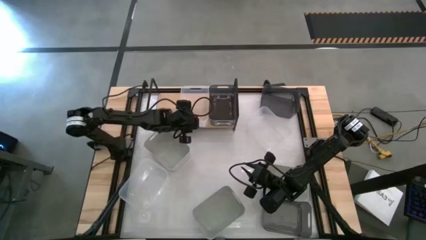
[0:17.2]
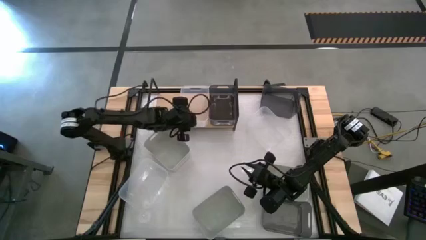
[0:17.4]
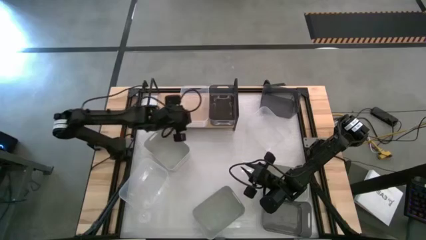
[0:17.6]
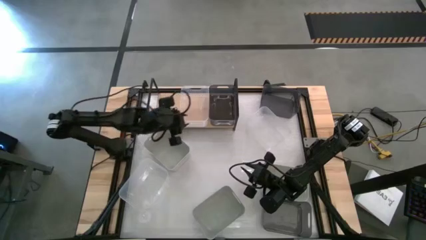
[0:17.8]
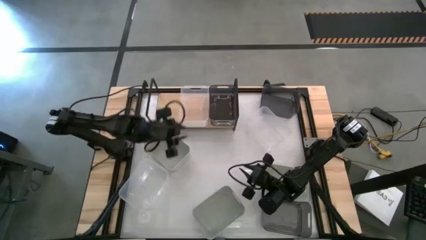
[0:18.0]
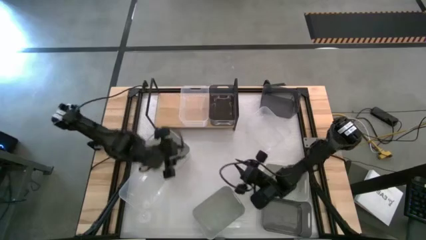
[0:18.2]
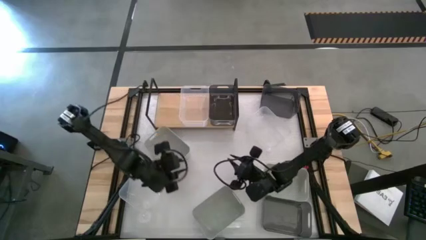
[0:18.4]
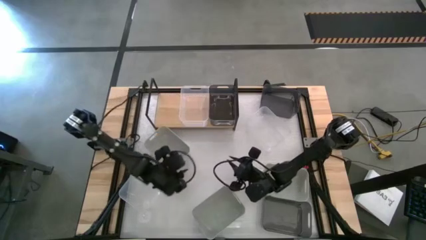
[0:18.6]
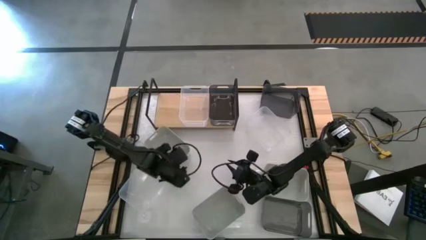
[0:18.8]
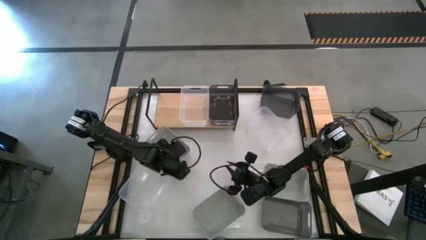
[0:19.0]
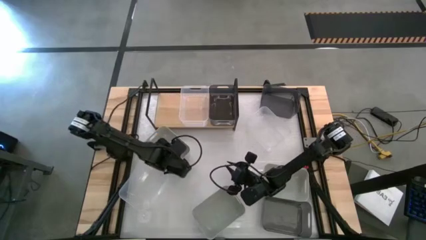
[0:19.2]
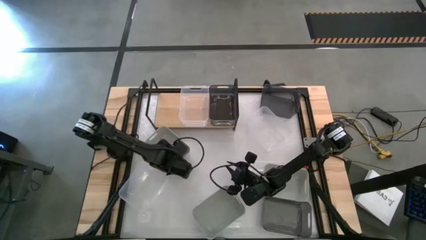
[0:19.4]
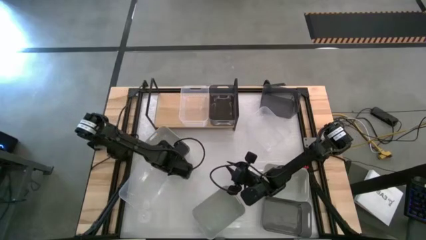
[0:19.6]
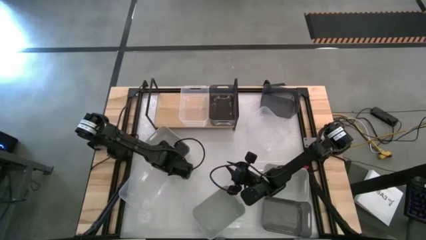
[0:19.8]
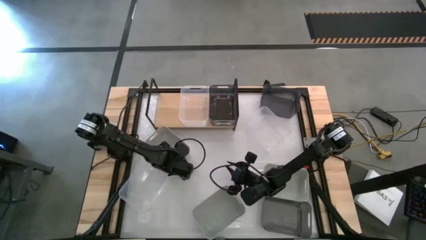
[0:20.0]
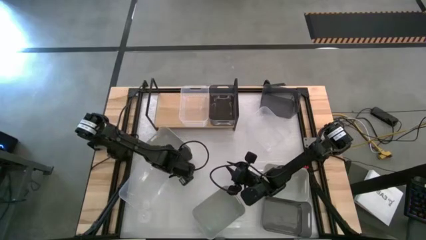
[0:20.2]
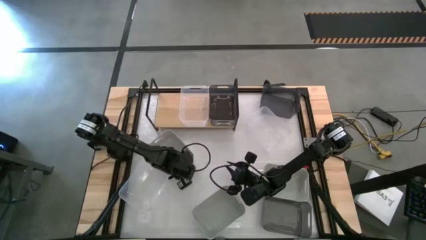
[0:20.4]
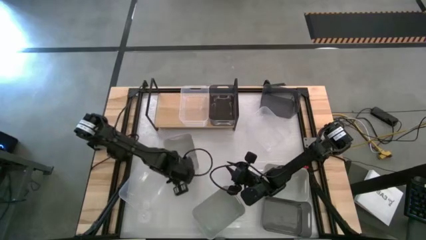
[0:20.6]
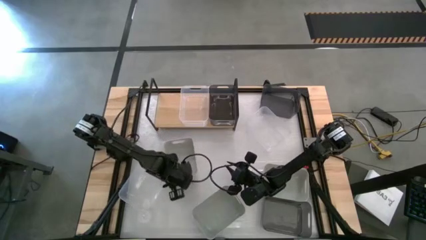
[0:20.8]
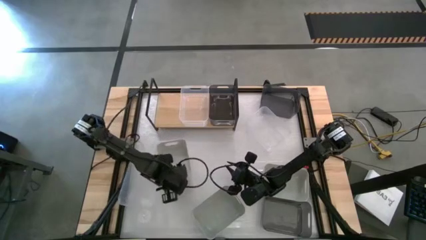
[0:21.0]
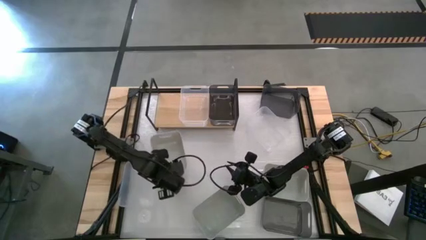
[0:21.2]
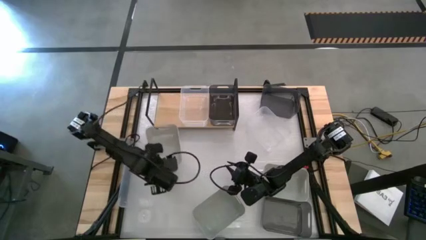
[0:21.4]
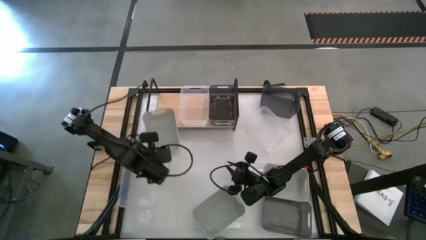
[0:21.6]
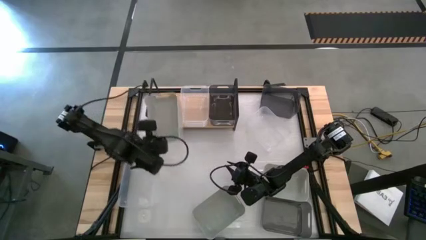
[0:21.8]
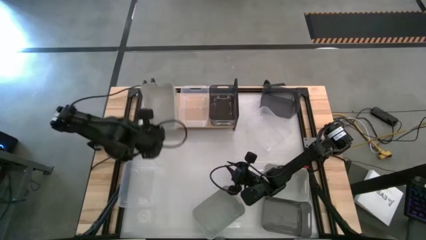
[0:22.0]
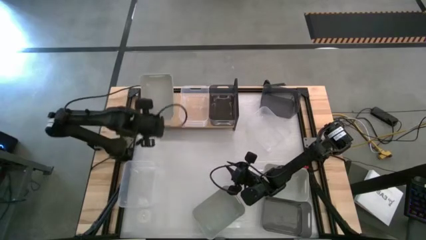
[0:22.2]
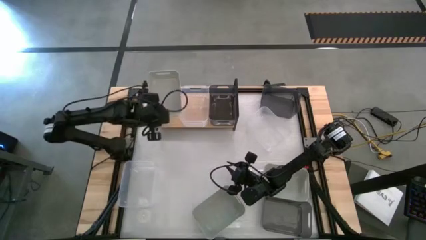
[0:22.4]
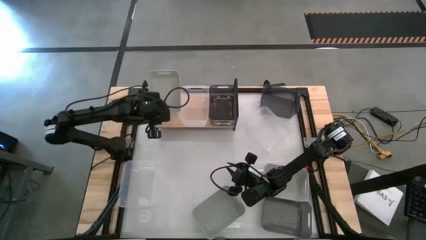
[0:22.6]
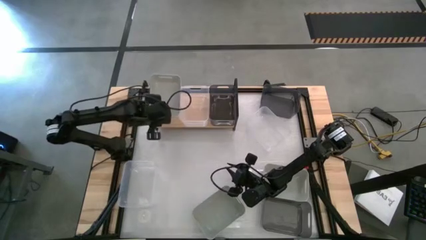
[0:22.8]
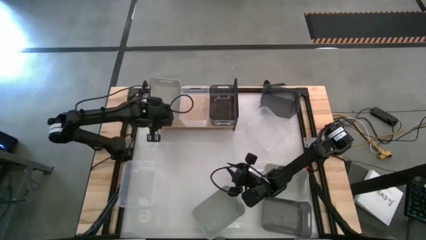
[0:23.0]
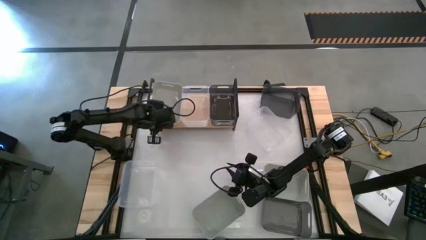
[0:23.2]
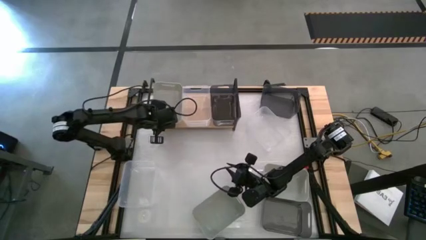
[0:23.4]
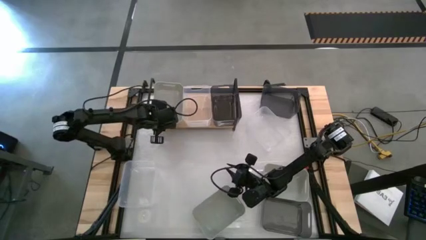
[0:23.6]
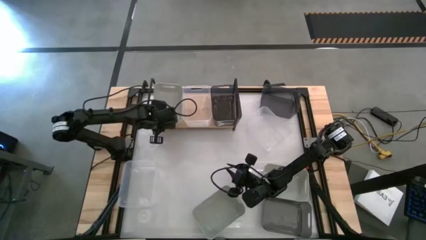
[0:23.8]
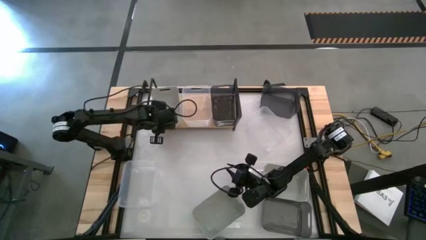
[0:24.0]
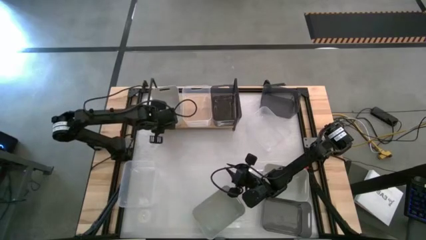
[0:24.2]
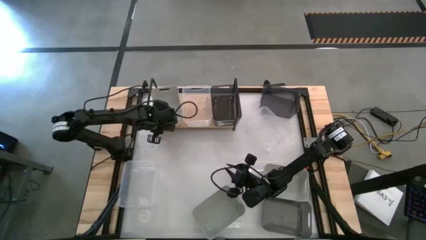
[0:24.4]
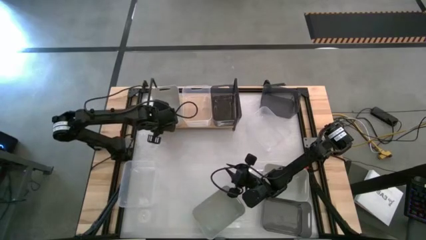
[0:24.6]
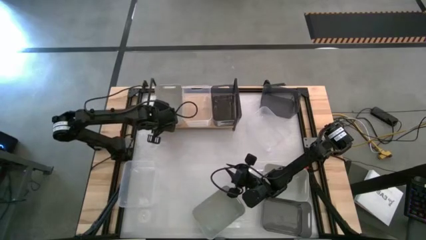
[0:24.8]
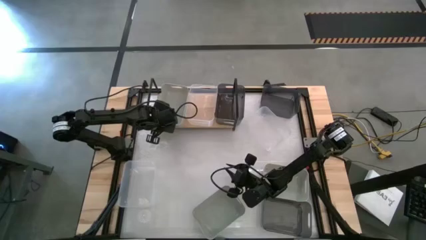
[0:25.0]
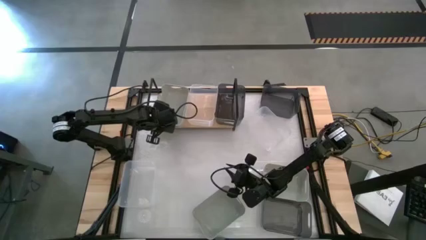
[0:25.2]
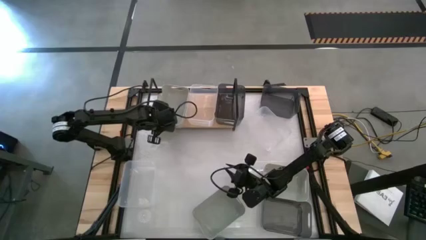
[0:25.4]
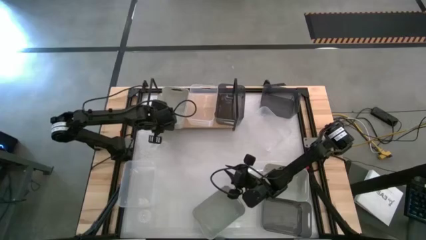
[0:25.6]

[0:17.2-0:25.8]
Task: Stack baskets on shelf by color
Put the left gray bin on the shelf

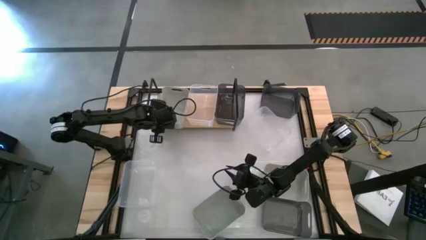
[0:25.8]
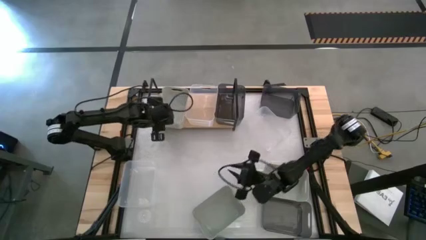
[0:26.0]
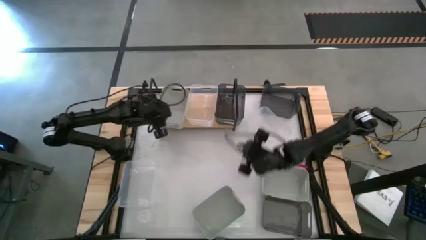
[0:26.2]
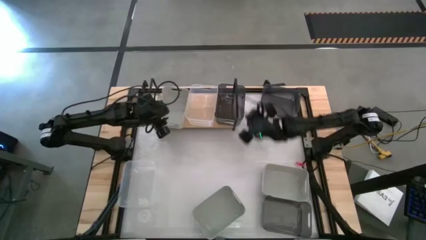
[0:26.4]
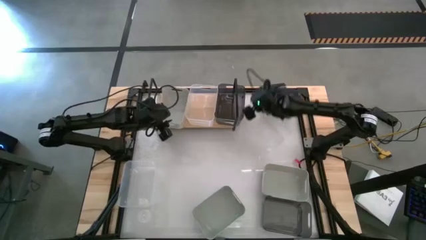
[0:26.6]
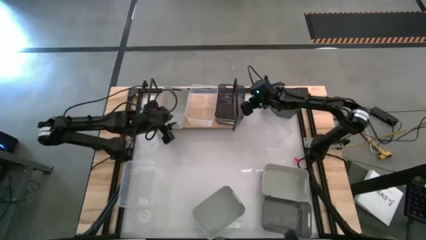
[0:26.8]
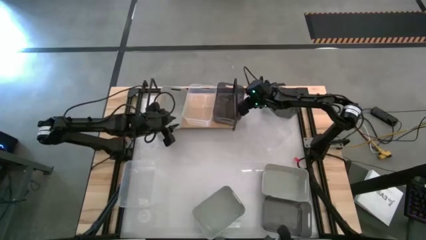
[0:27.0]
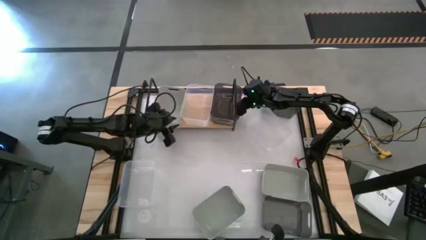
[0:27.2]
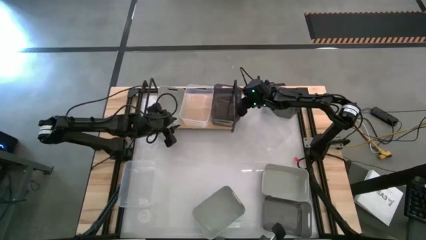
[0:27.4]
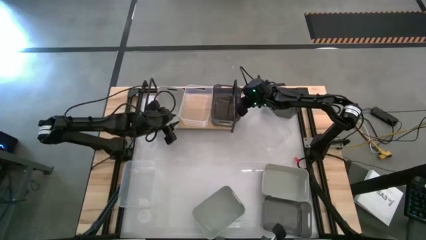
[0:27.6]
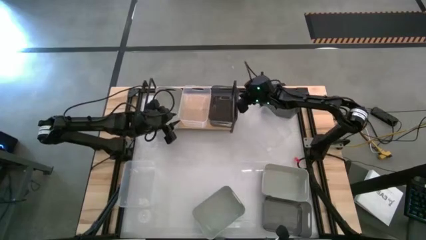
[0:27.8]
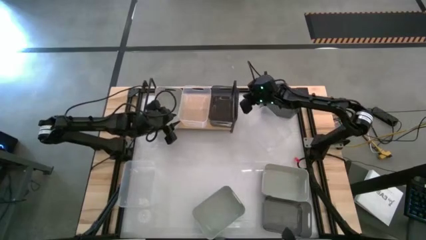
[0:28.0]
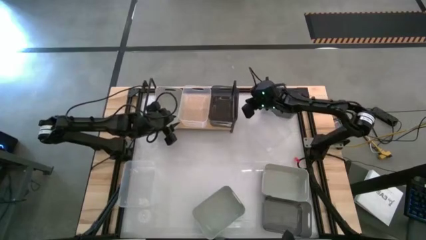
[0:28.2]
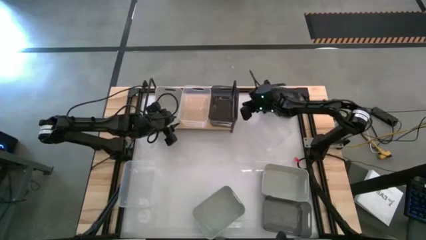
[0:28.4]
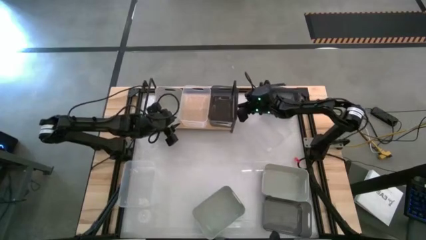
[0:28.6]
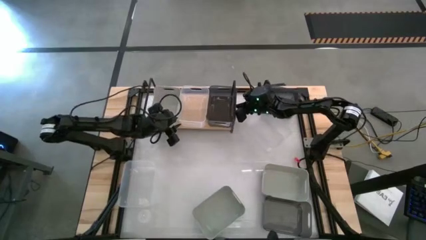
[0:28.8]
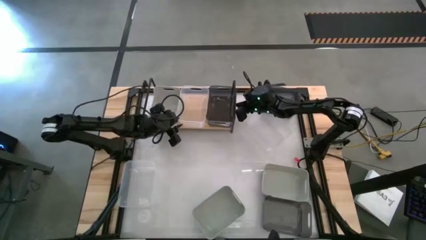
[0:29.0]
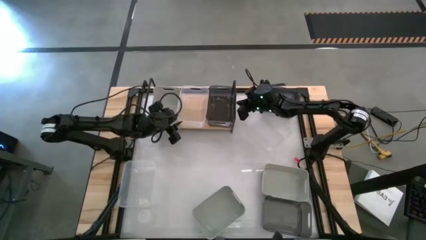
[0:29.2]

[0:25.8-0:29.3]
Adjust the bins on the shelf

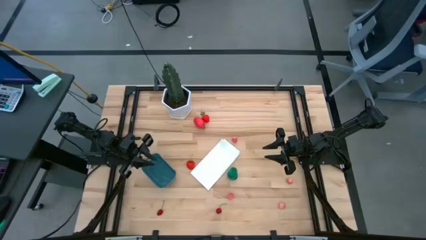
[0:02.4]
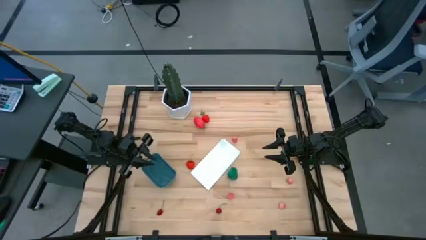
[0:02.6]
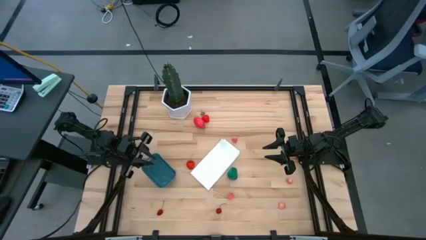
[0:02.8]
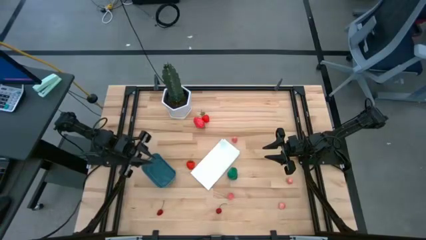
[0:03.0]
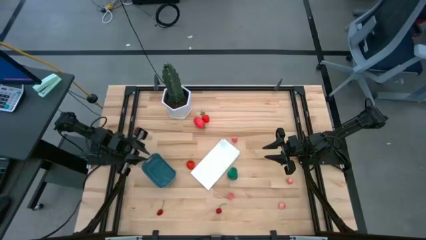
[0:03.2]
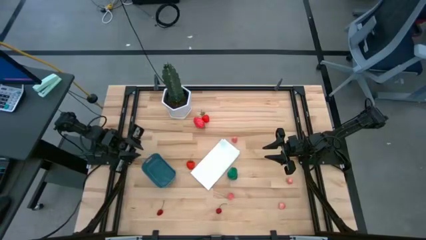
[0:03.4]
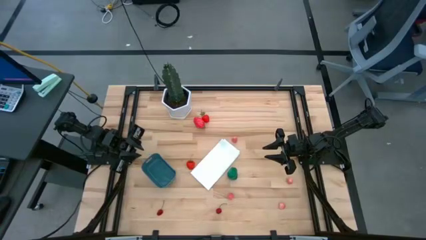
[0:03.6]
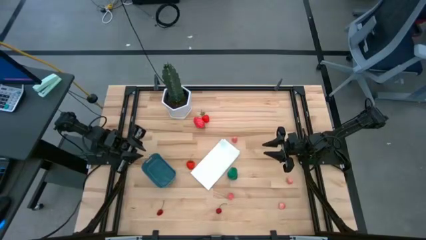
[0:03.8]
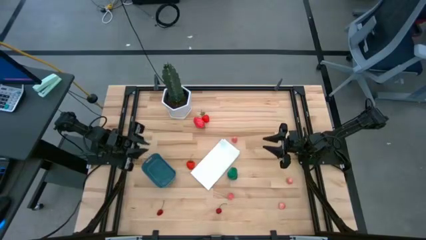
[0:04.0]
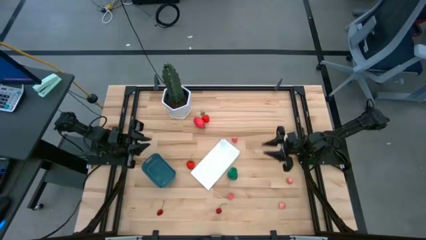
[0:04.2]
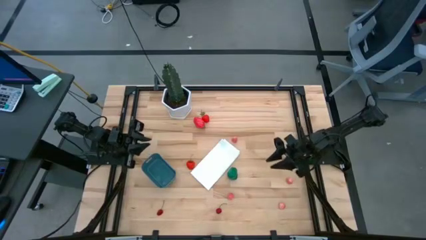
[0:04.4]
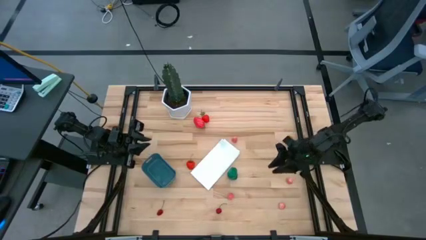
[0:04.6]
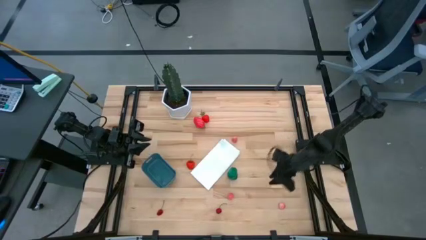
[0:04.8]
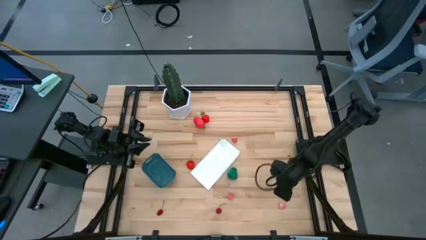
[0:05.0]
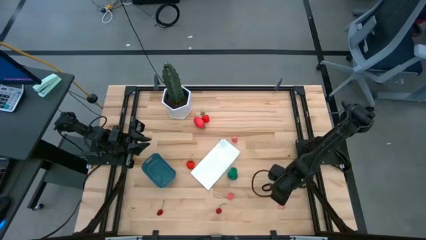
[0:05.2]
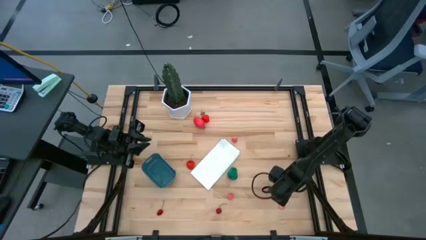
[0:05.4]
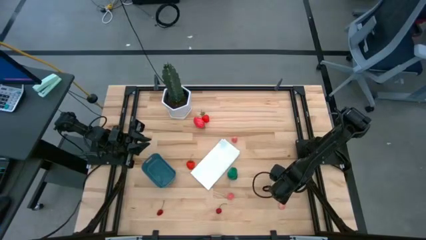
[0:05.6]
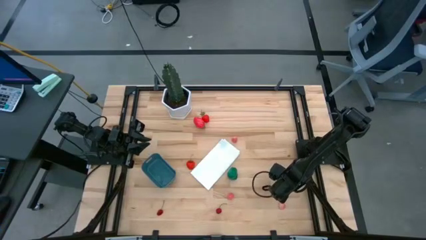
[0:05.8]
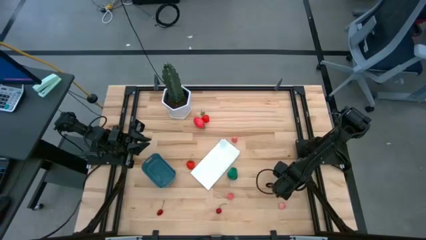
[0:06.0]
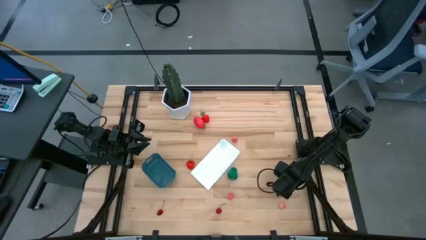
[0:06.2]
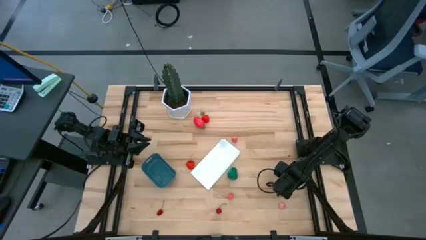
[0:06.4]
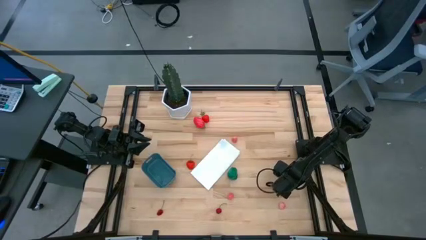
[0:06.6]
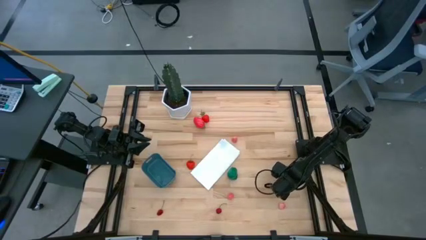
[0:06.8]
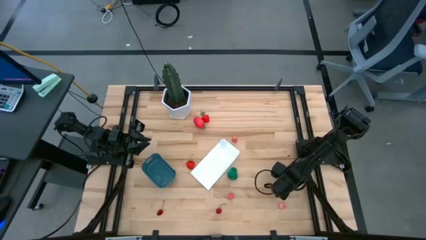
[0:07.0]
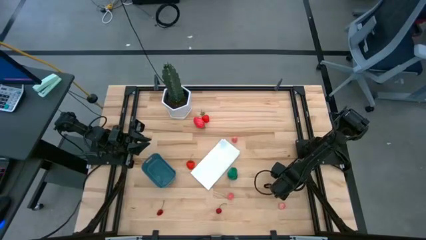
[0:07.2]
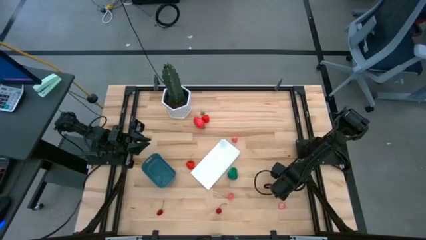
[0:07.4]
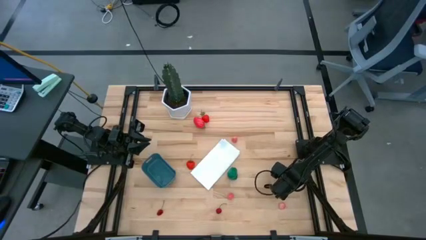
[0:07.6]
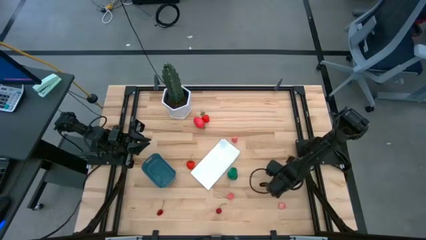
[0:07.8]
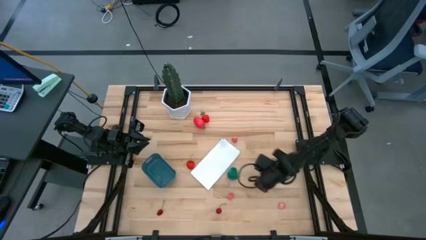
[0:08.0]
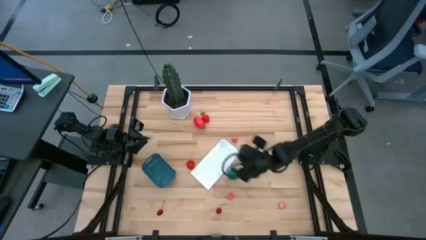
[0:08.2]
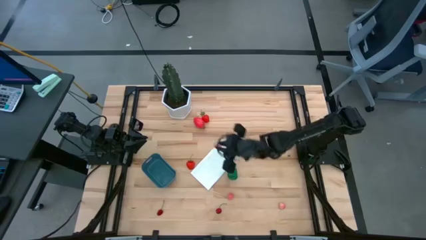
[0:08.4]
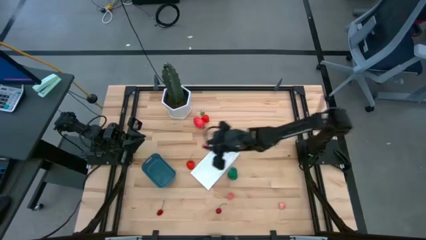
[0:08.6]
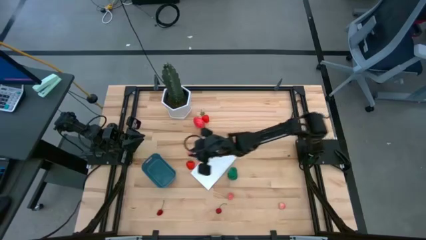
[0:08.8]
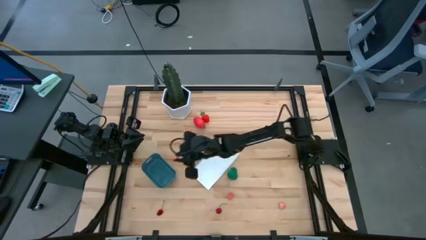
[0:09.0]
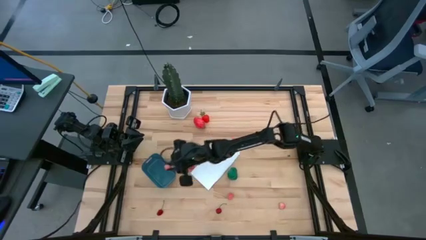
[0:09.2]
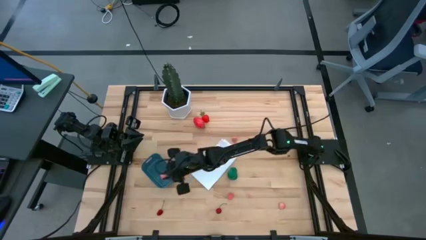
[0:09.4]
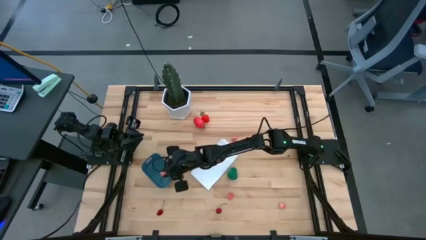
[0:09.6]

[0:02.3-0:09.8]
Task: Pick and placing Produce into tupperware
Put the peach into the blue bin
